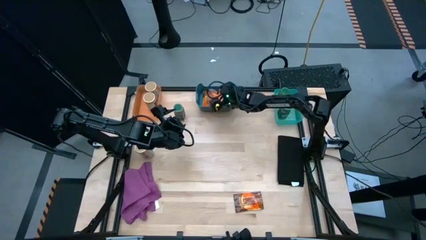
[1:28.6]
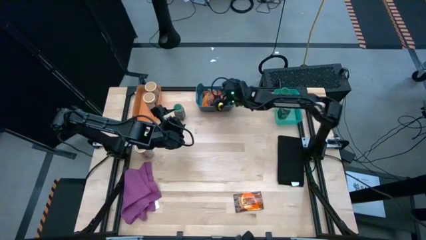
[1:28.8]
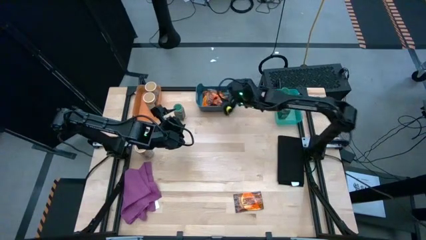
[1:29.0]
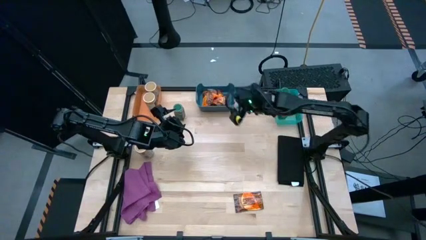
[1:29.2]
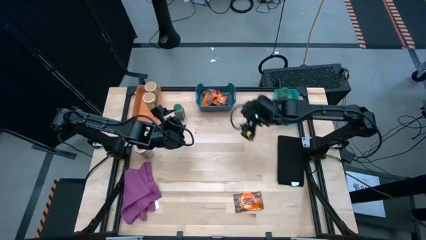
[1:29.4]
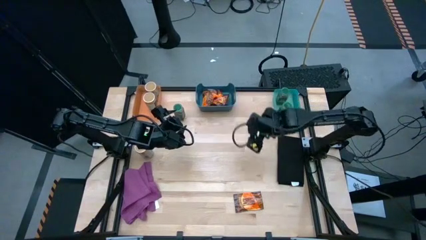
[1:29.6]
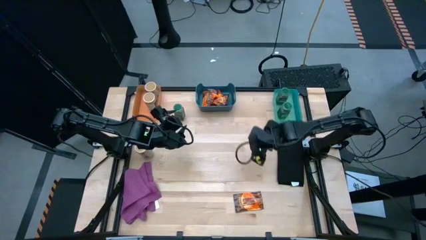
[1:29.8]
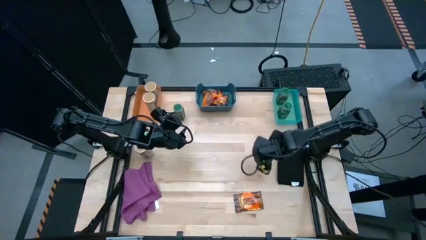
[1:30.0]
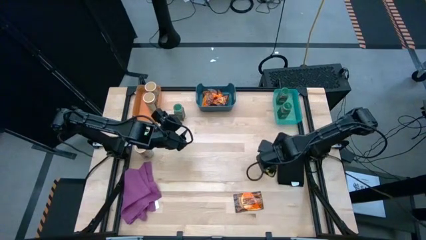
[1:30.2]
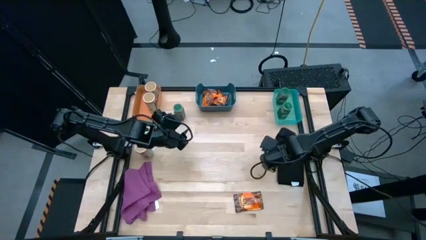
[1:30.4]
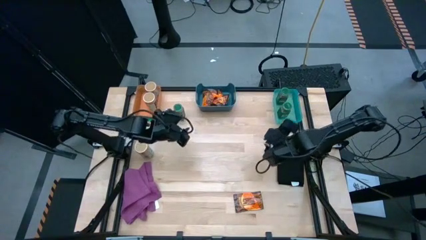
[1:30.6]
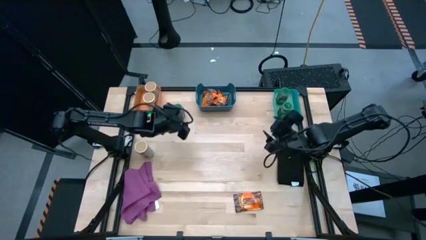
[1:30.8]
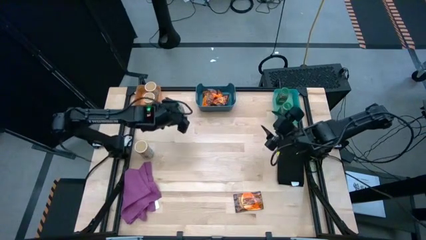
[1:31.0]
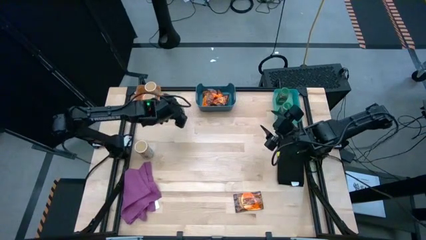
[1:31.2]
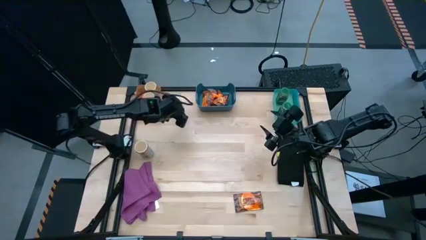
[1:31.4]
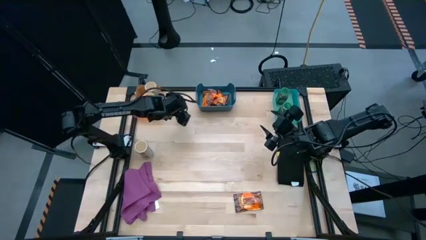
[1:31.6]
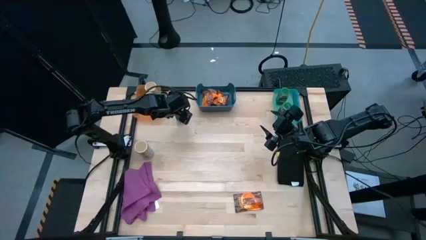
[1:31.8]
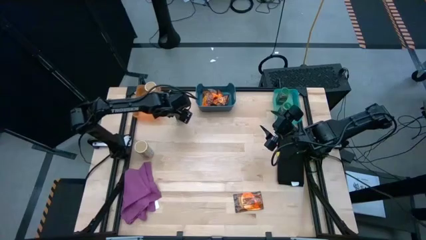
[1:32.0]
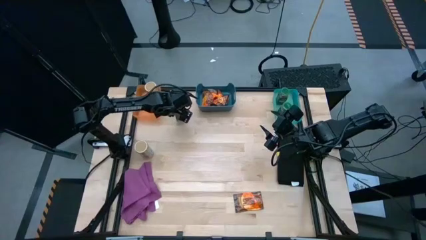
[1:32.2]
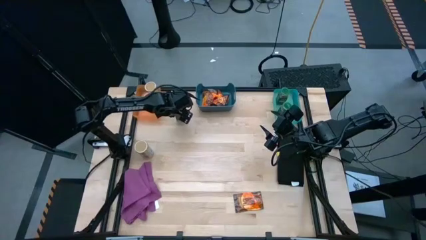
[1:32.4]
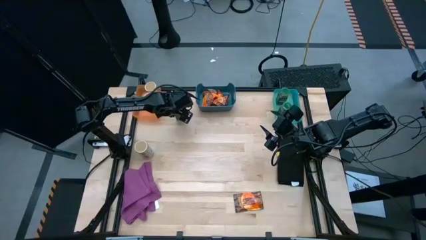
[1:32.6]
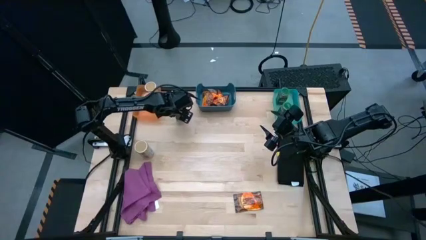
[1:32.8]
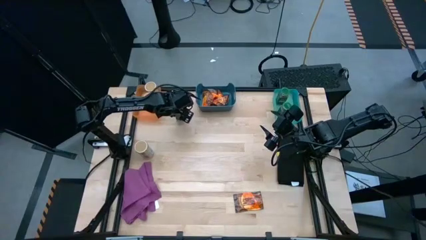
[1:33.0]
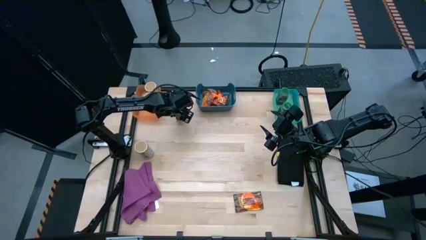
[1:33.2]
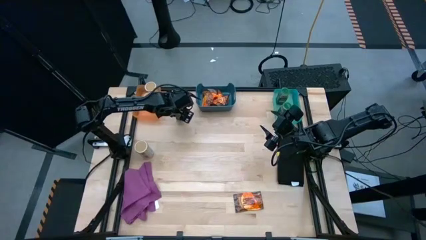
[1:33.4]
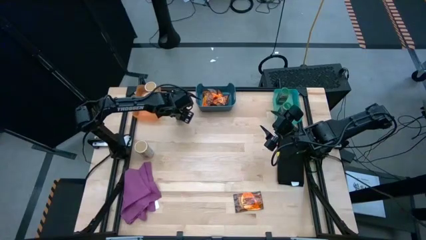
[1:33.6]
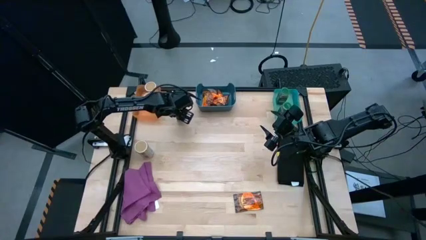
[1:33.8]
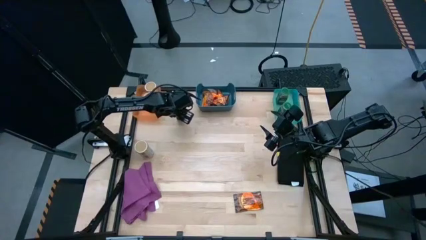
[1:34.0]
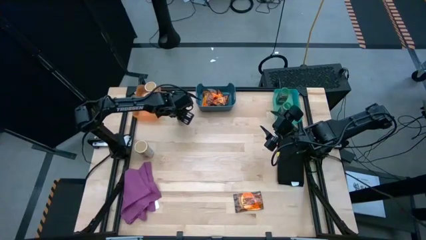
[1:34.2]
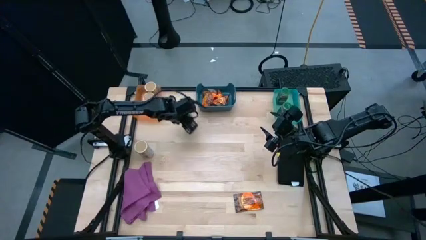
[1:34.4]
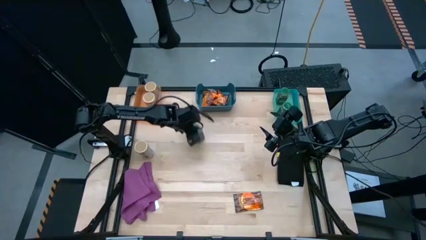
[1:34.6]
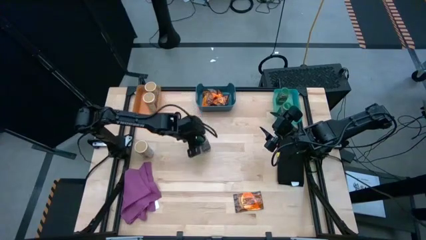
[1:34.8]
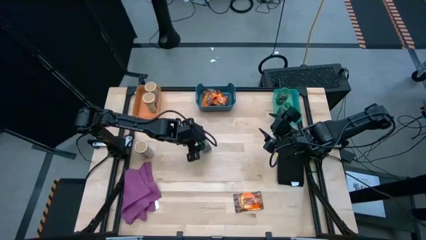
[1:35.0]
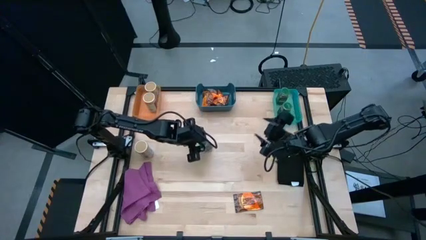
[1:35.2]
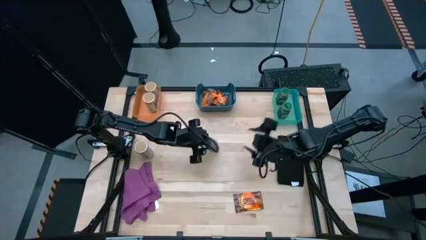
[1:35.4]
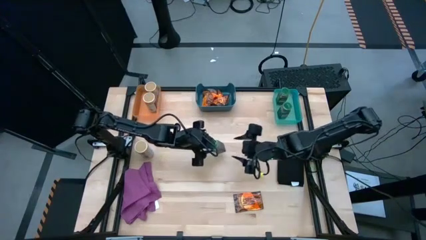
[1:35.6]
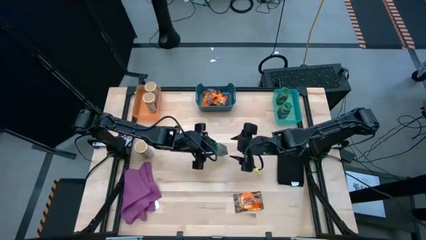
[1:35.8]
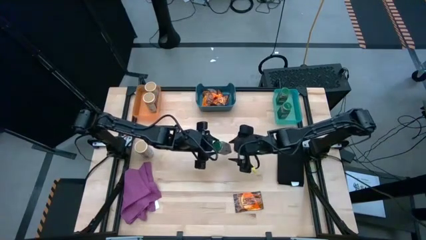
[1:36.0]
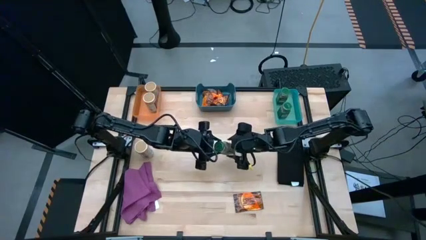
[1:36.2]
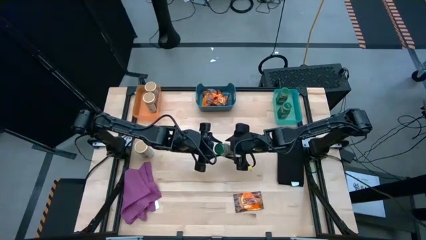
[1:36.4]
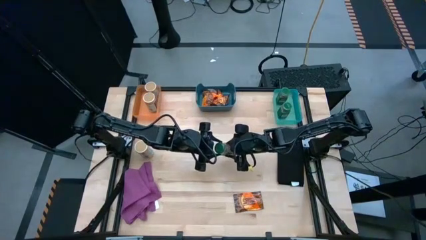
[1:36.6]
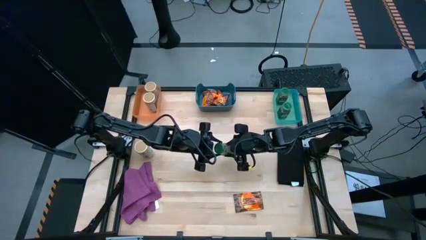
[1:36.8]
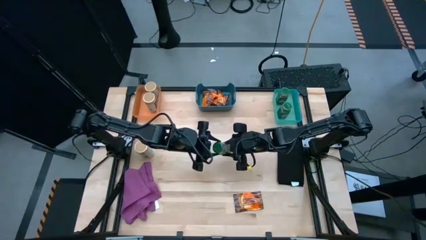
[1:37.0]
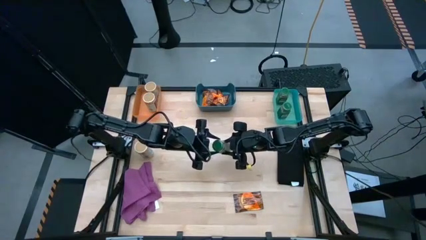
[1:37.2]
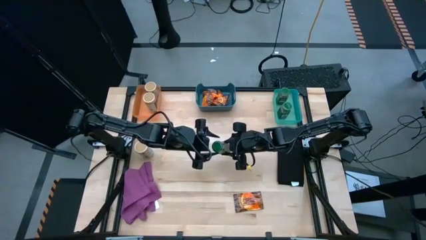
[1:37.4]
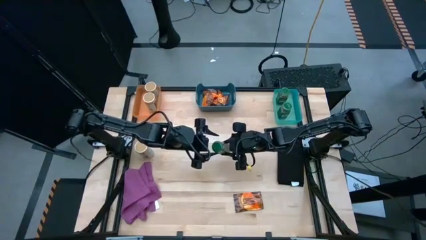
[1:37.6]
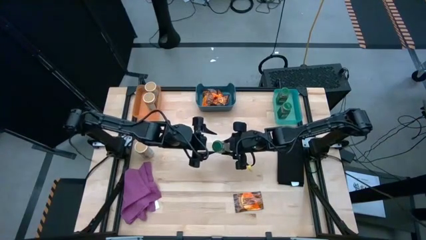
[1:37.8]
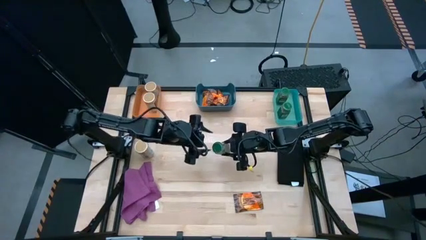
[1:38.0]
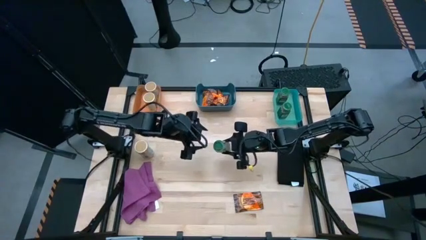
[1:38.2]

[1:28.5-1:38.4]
Task: Sort spices by type
Put the green seasoning bottle into the light blue bin

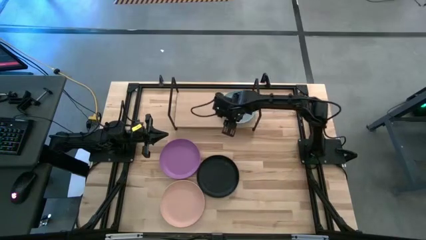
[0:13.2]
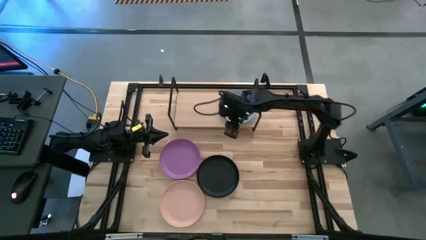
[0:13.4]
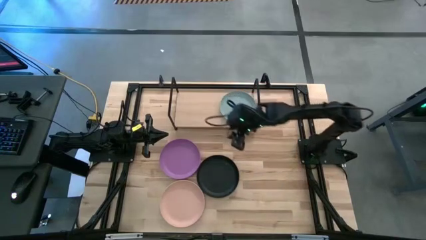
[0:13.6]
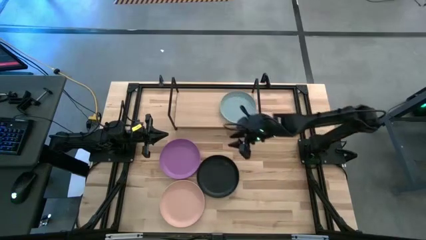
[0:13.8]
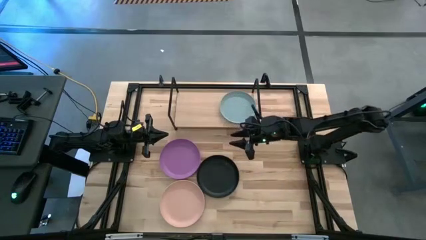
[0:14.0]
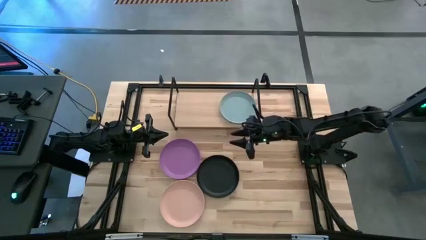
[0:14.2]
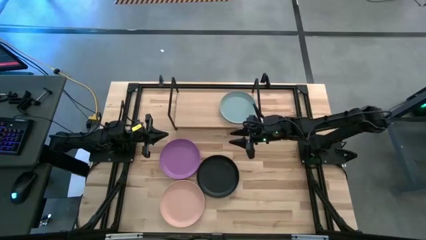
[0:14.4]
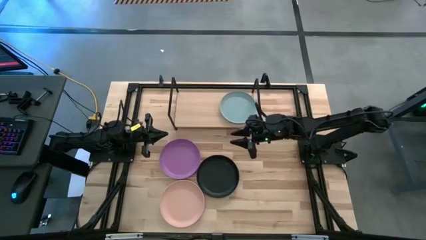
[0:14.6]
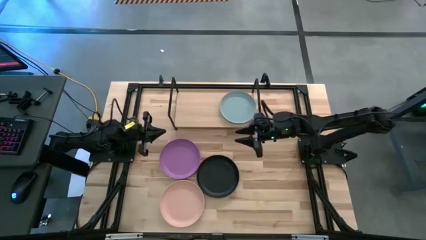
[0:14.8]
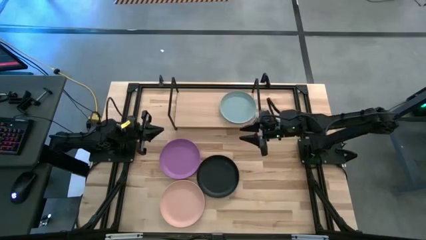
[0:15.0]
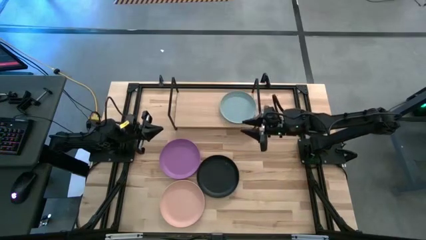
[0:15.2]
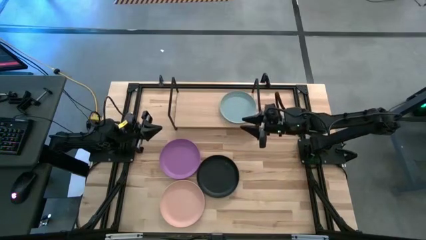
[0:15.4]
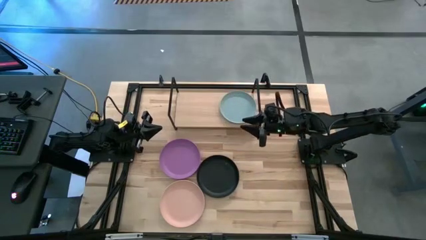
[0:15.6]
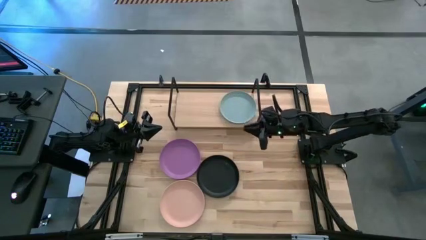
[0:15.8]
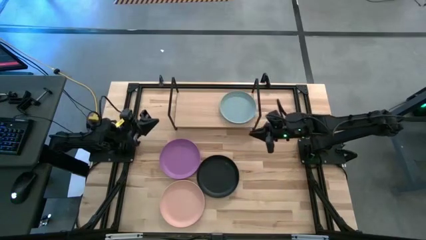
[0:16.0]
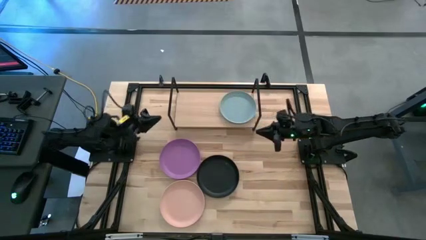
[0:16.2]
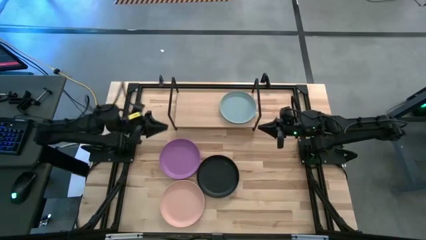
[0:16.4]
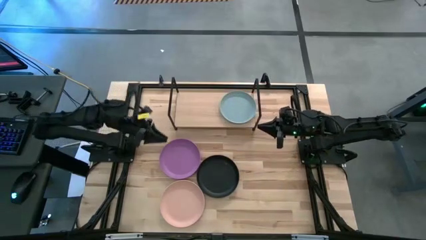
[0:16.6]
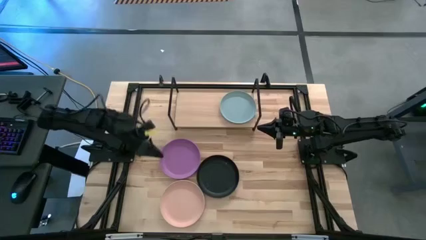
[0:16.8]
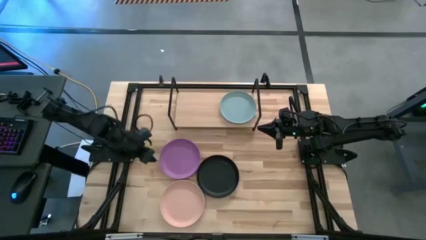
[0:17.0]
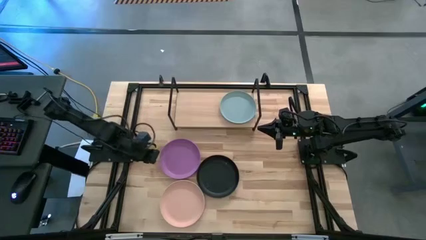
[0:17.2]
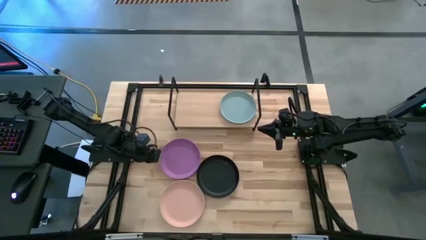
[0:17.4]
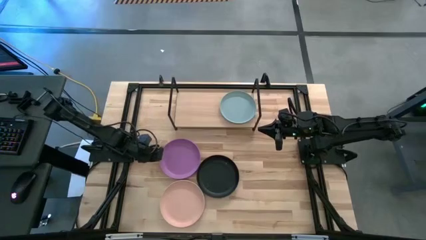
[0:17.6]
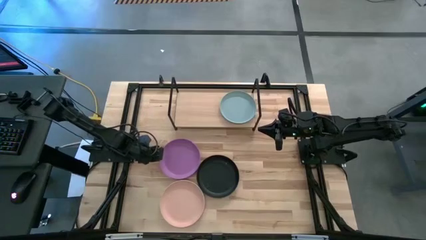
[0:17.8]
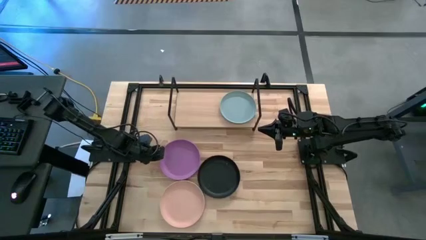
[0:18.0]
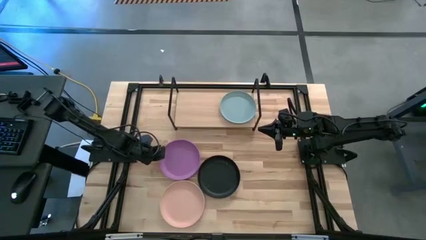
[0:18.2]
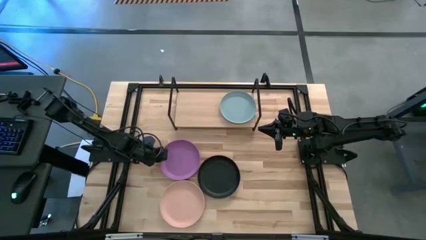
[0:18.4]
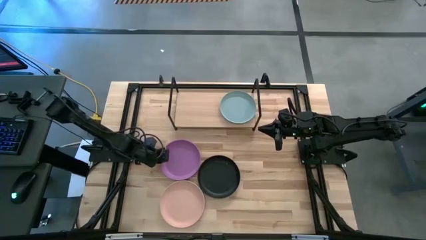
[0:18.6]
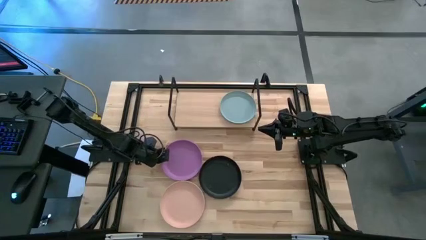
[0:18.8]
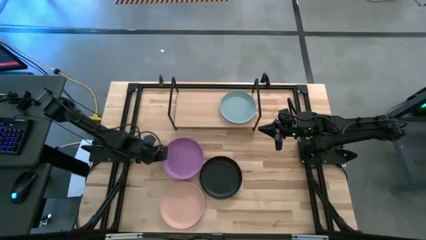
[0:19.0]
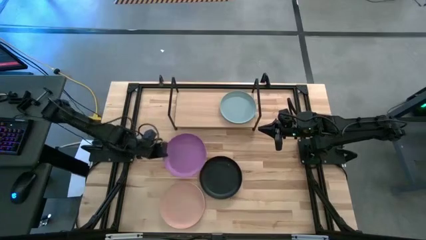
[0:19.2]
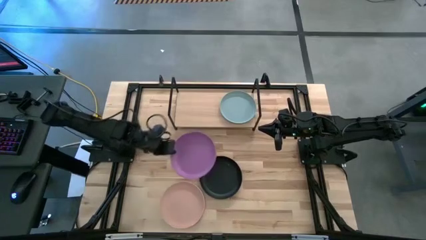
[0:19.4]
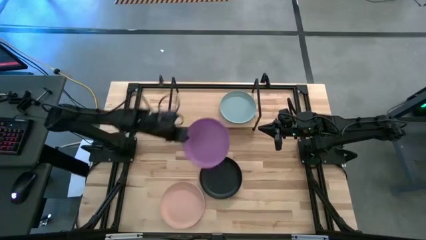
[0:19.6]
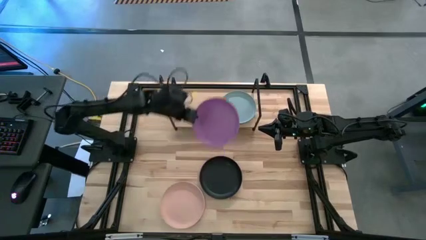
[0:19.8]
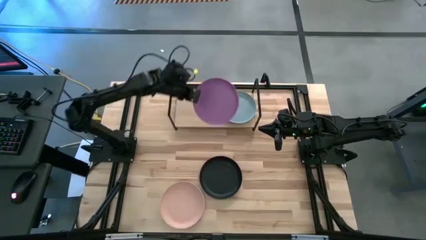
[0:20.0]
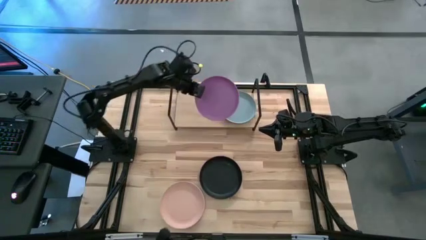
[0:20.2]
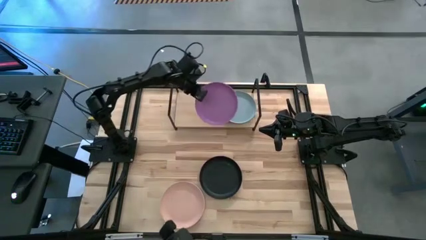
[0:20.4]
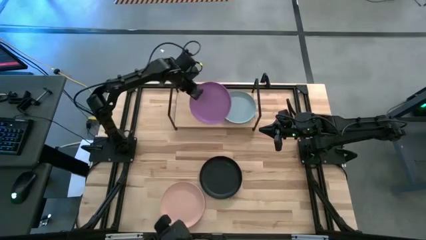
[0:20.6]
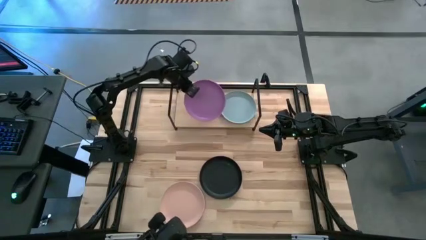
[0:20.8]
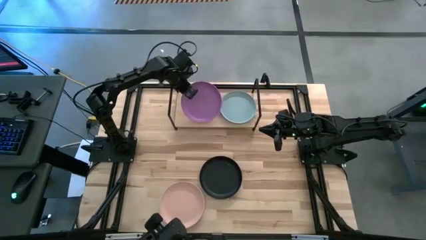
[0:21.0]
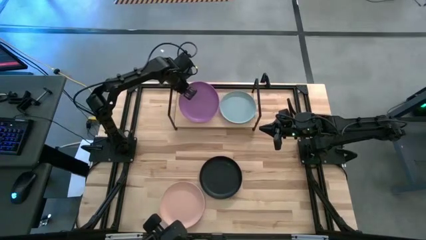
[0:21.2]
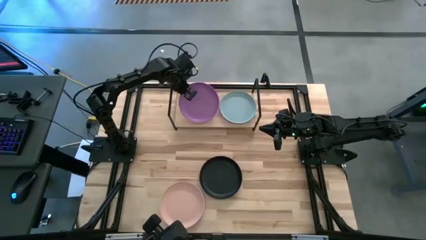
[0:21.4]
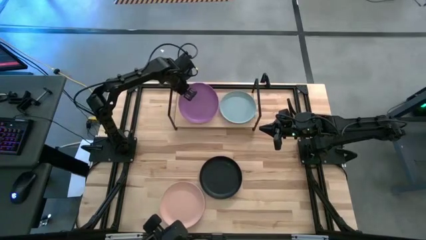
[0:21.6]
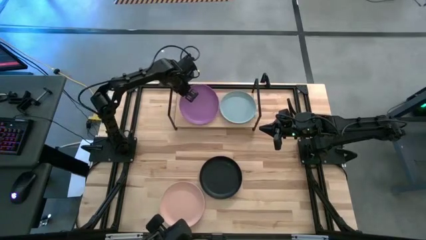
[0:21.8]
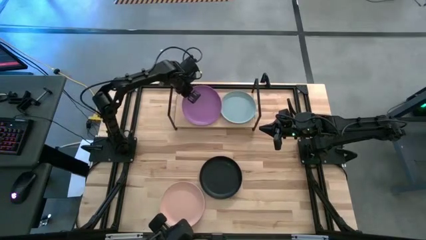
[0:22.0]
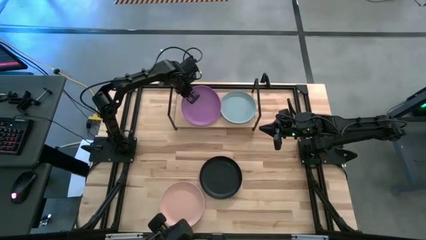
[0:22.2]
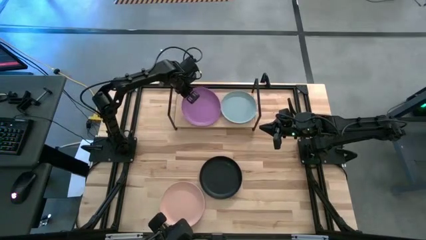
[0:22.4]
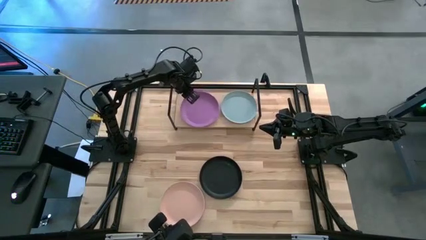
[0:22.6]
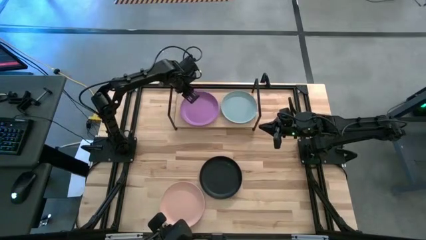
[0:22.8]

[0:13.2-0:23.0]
Task: Place and stack plates onto a shelf
Put the purple plate on the shelf
